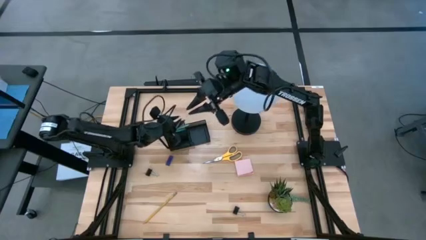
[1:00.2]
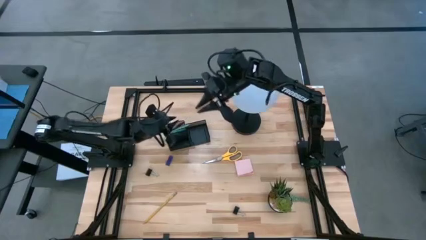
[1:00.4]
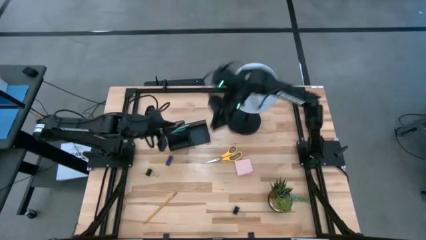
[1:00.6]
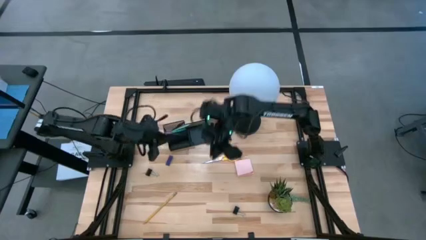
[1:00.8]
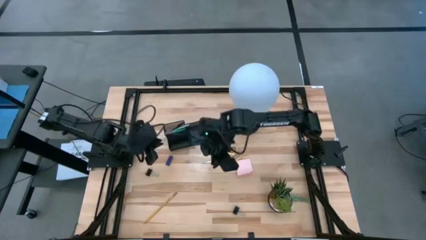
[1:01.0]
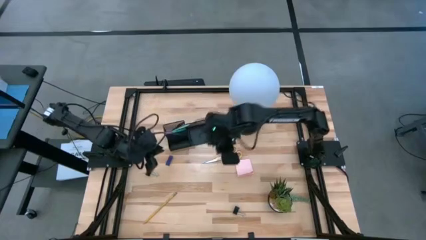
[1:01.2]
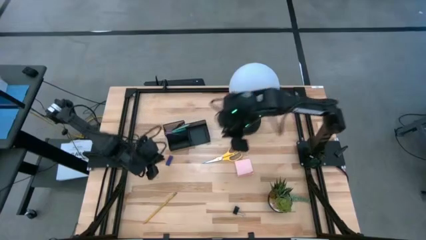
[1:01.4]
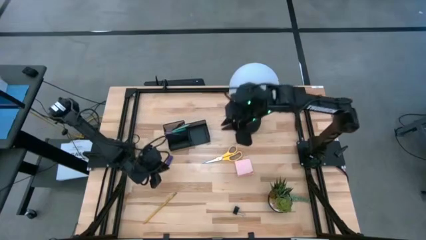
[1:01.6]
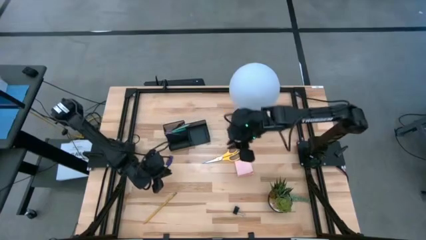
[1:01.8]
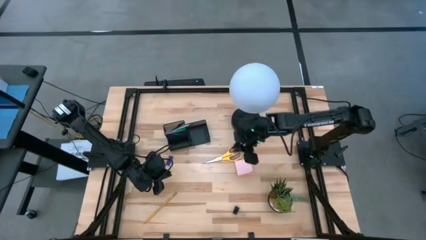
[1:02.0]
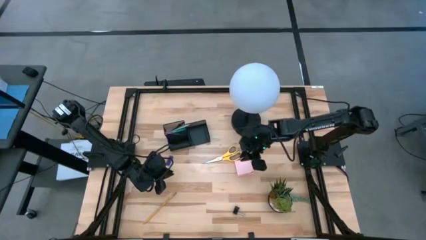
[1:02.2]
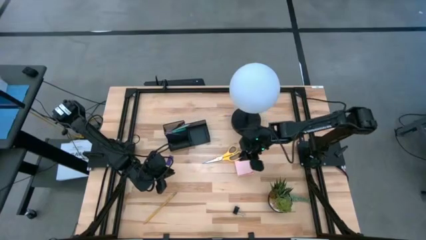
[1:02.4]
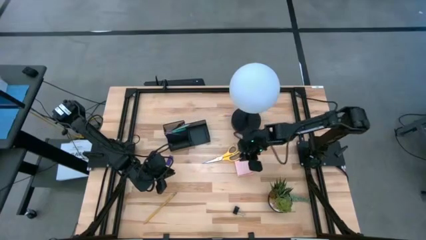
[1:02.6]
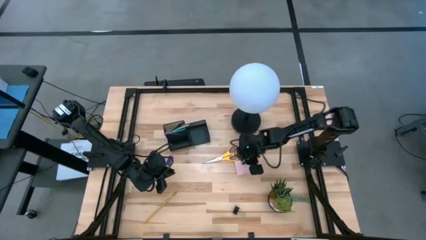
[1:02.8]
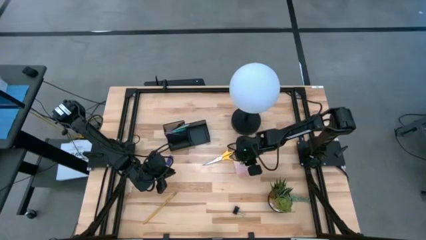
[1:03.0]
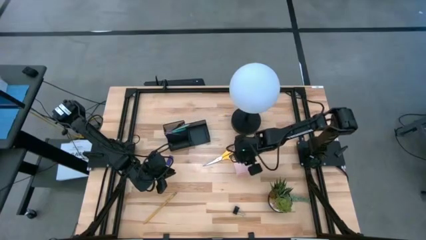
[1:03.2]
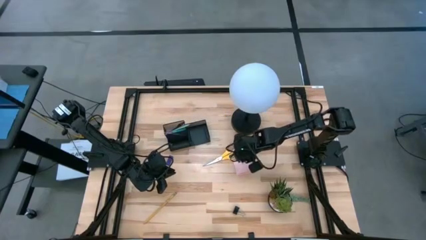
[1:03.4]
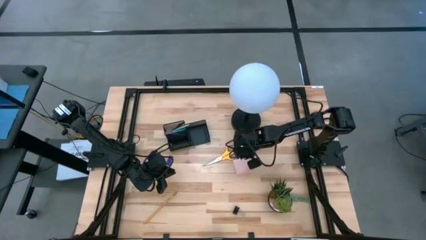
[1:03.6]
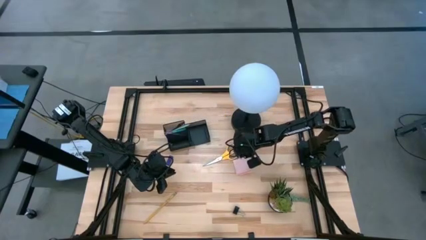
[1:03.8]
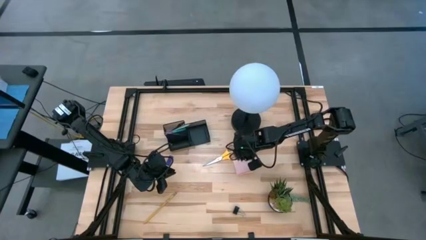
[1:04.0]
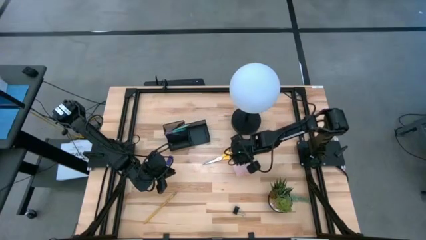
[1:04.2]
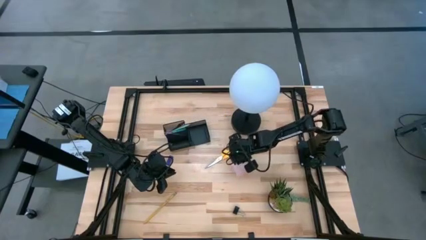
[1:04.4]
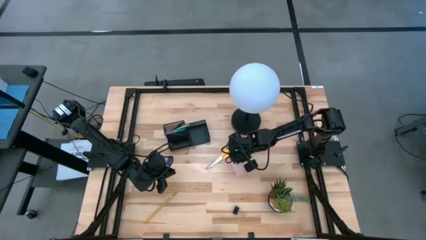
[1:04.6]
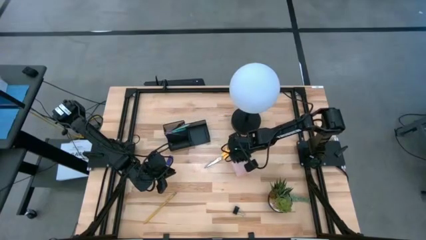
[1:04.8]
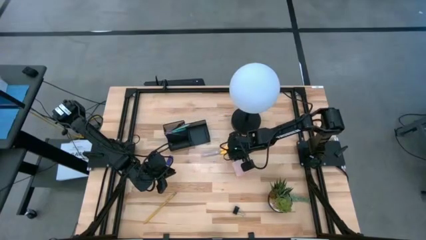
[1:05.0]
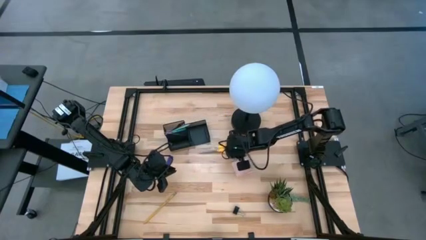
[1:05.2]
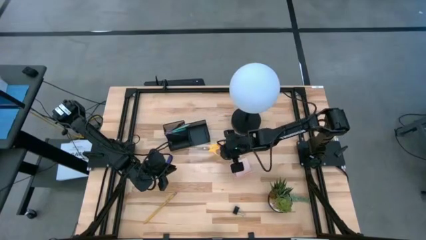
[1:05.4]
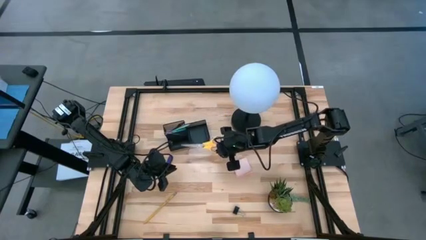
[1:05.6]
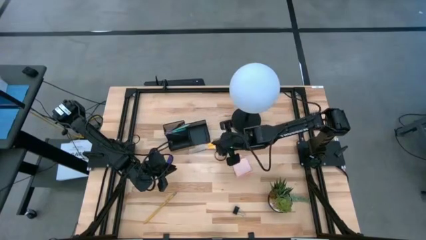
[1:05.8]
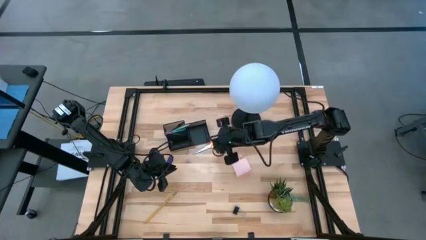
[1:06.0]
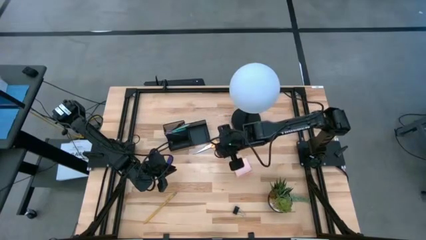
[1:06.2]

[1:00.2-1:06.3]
Task: Pick and place office supplies into organizer
Put the yellow scissors into the black desk organizer

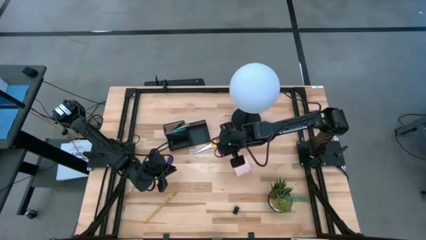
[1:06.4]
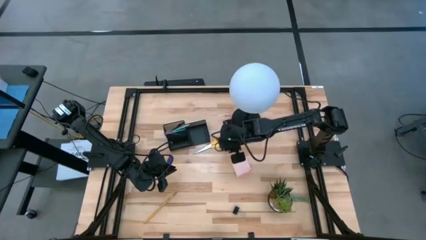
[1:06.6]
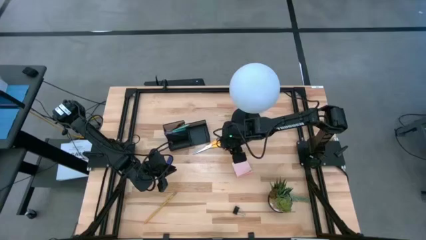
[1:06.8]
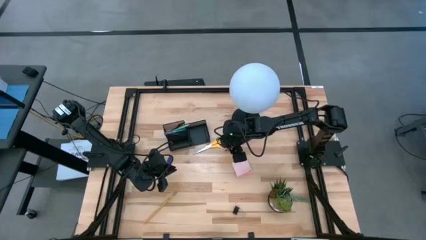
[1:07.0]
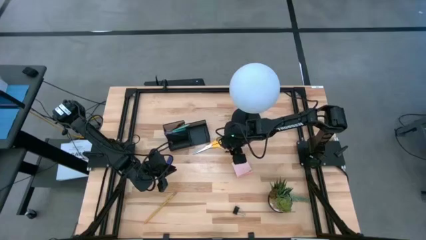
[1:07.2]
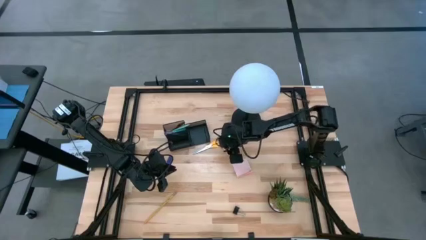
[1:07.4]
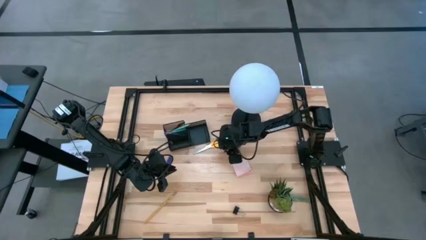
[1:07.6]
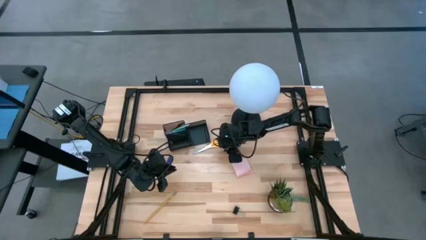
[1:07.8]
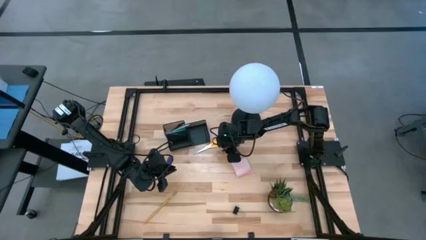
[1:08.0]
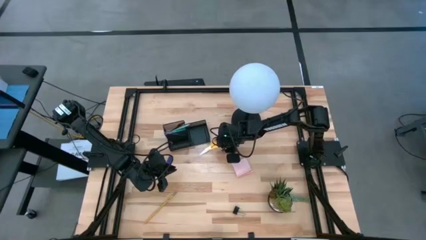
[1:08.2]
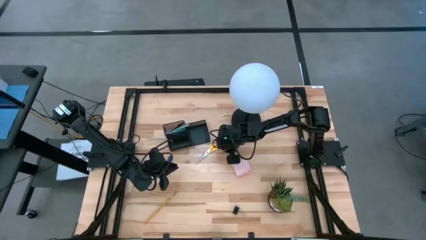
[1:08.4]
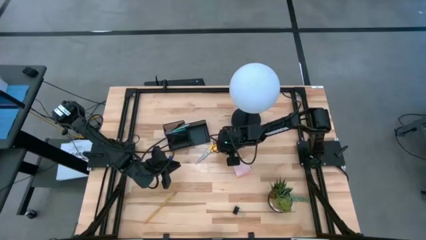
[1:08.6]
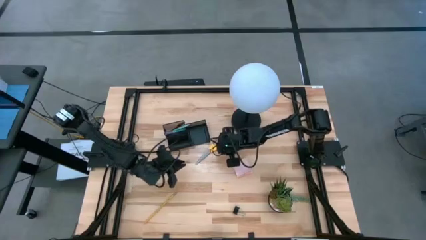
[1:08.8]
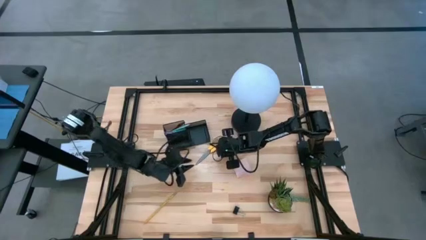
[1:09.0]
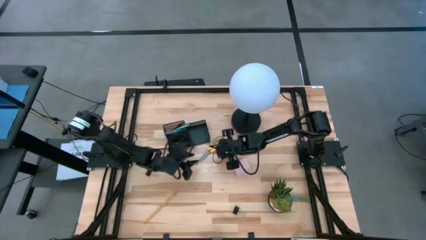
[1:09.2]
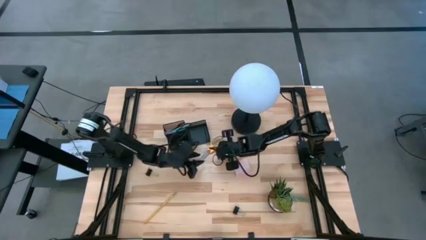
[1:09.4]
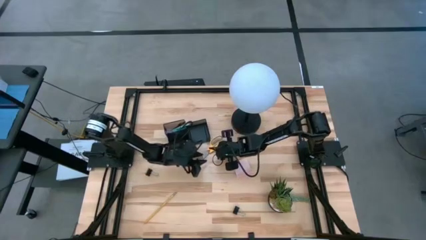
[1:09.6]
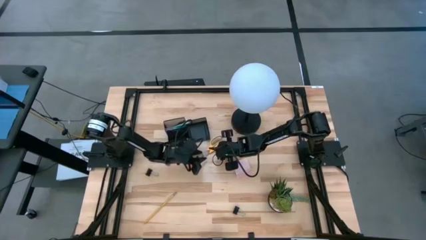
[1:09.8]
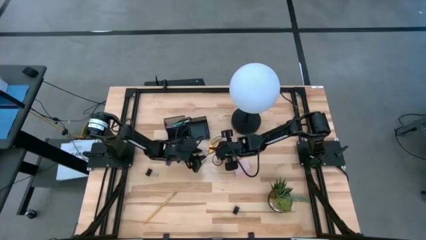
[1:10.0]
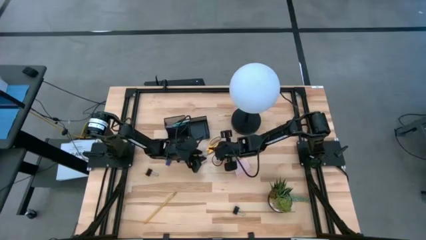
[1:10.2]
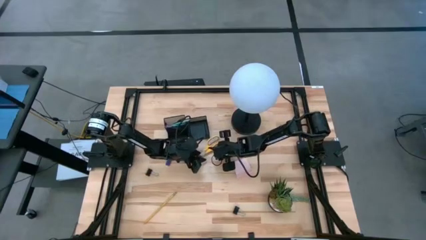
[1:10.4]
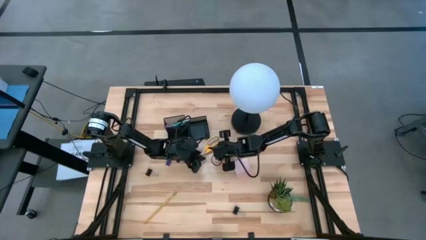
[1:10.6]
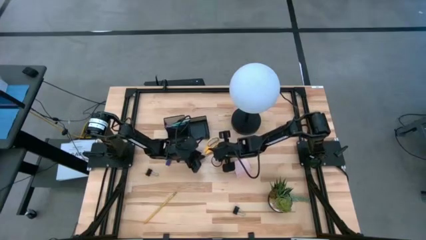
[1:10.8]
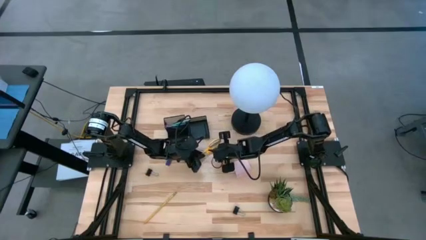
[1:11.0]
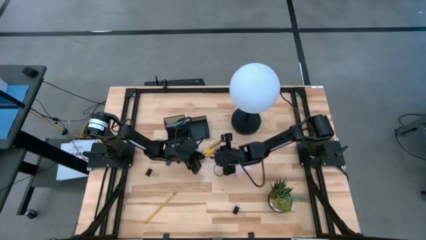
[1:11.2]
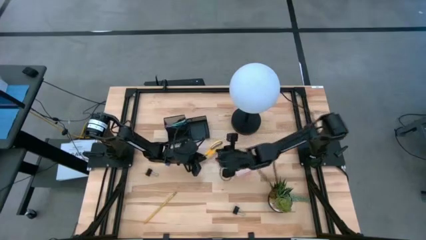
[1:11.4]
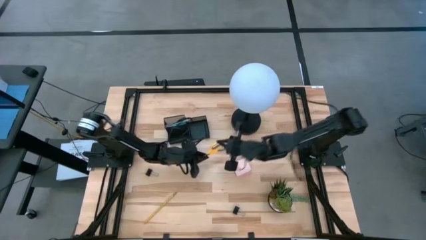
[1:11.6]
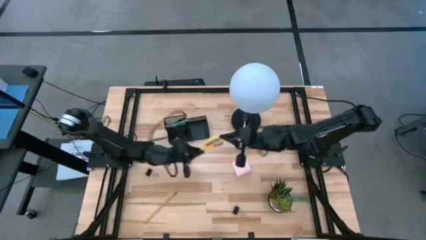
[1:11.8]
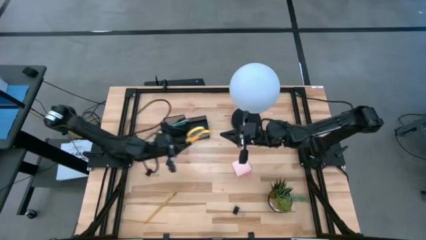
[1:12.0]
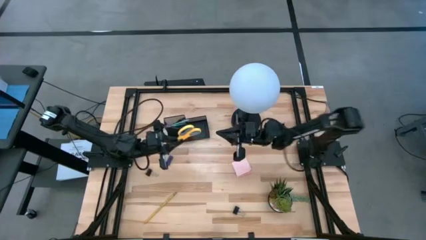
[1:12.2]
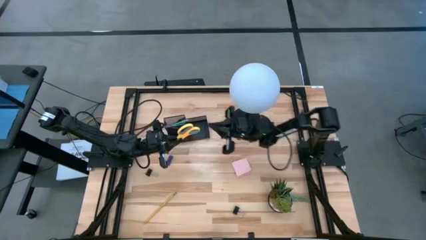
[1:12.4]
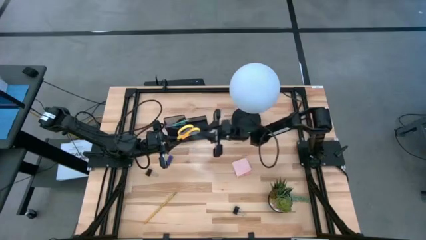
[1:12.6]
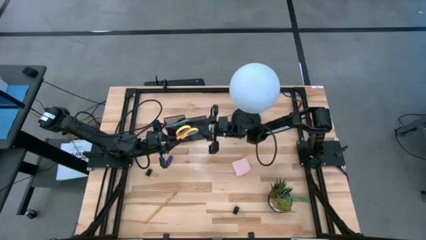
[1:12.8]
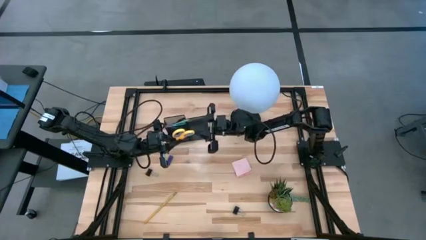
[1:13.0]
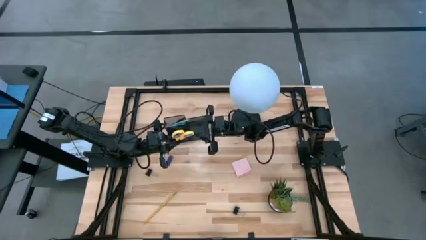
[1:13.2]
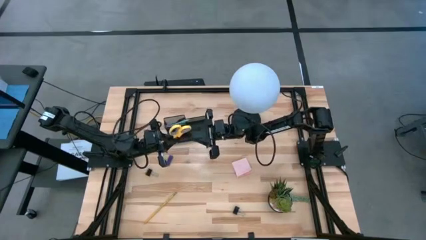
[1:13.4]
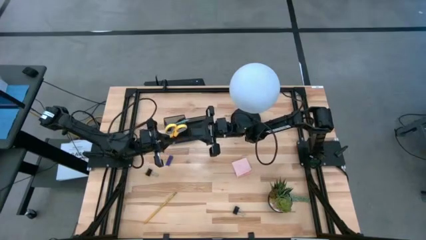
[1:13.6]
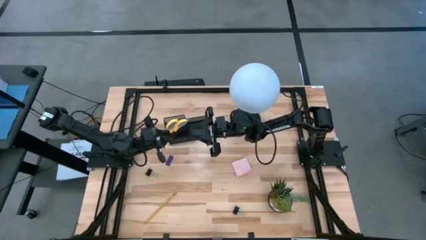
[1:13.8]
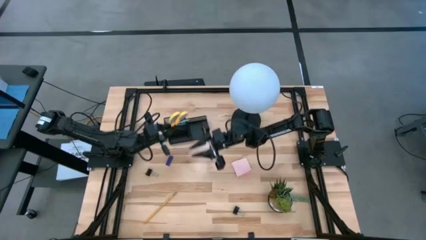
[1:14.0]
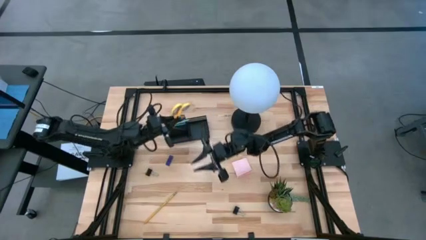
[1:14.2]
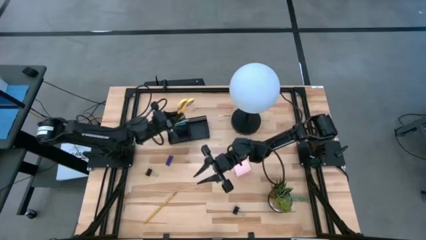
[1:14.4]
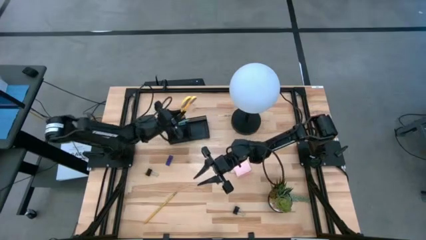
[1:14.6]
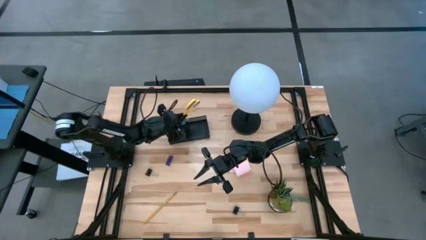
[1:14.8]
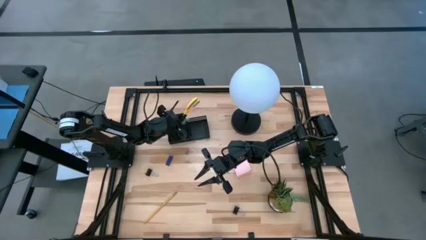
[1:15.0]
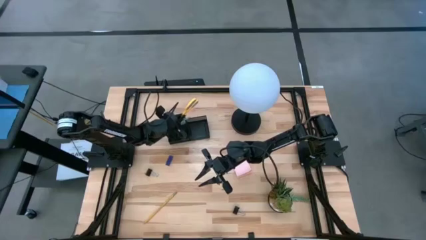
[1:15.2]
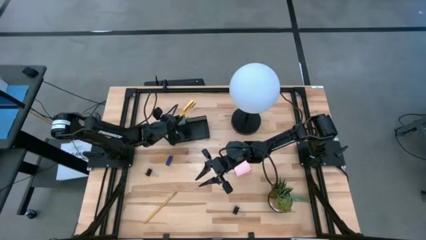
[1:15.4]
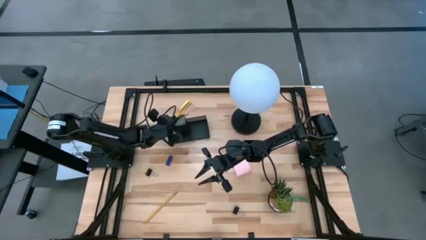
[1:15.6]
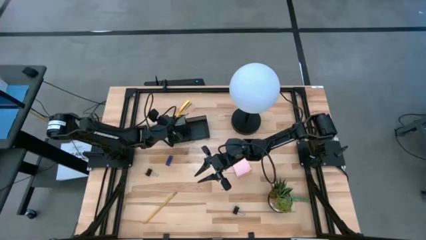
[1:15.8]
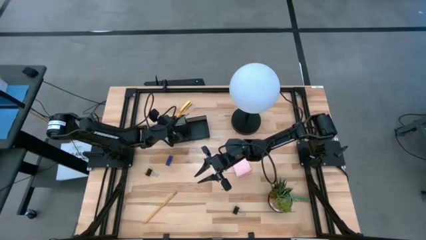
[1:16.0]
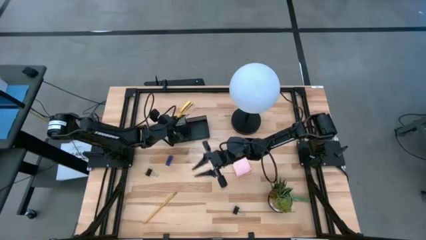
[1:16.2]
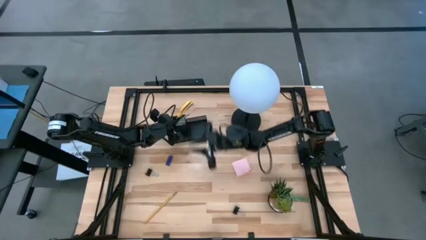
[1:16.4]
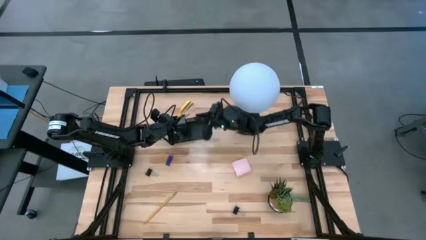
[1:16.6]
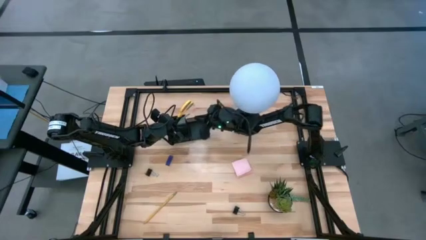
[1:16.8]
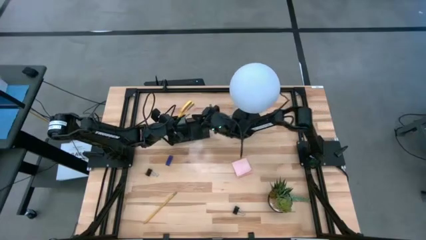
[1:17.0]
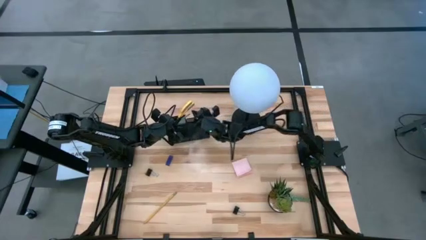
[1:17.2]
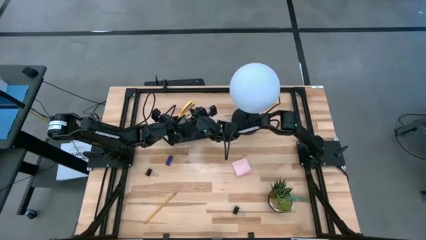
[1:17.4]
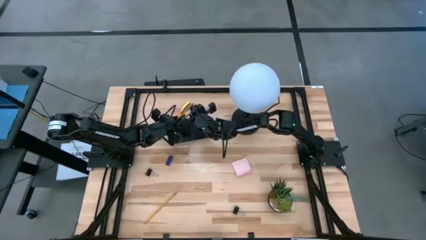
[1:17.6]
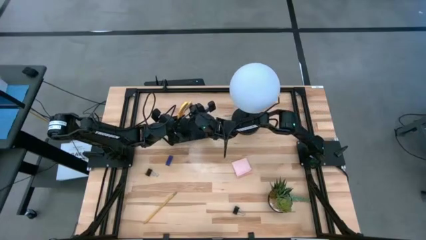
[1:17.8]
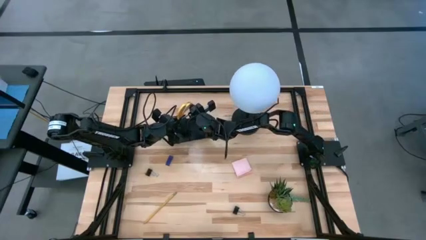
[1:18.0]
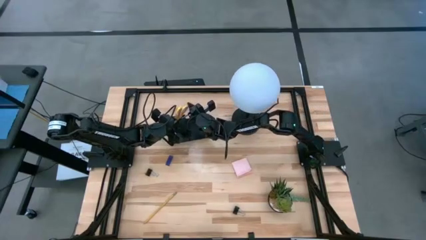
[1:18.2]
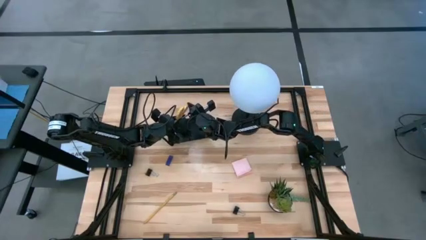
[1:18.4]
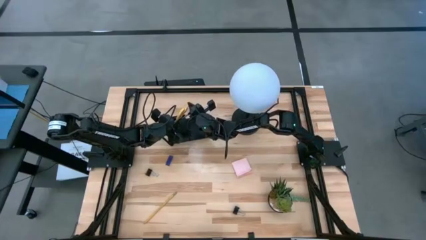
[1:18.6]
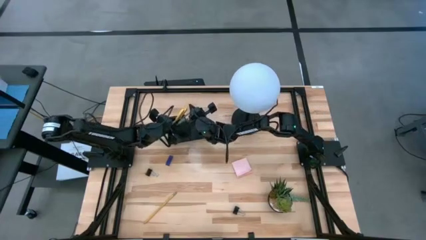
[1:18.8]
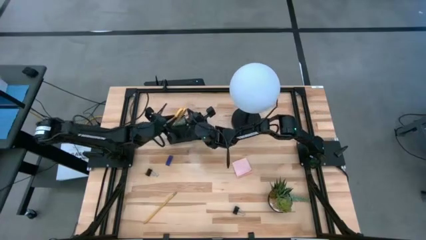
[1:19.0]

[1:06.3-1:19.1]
Put the yellow scissors into the black desk organizer
